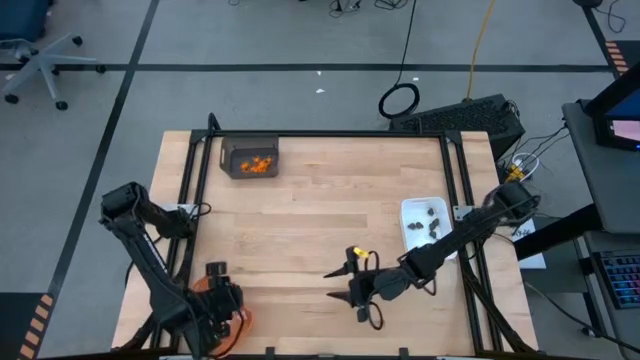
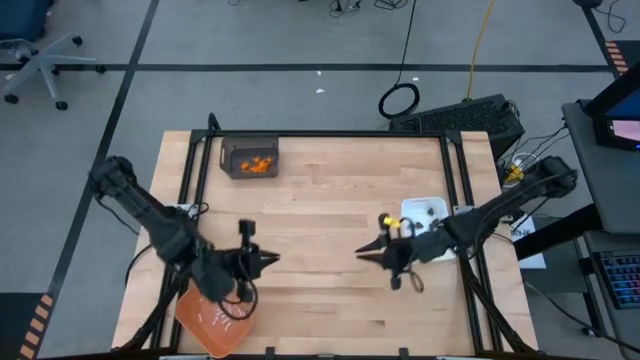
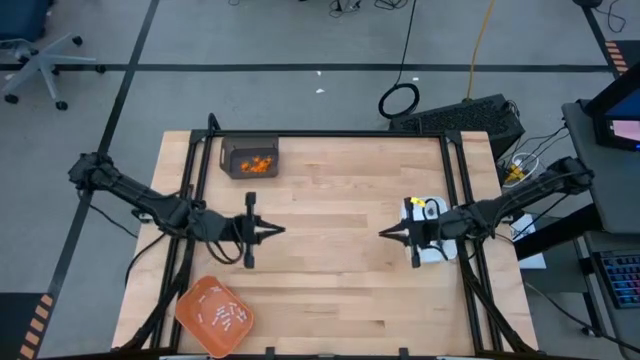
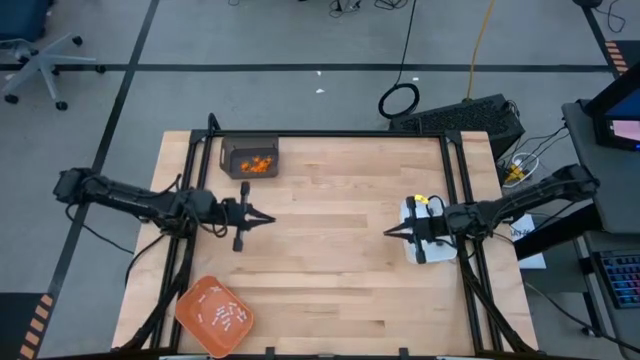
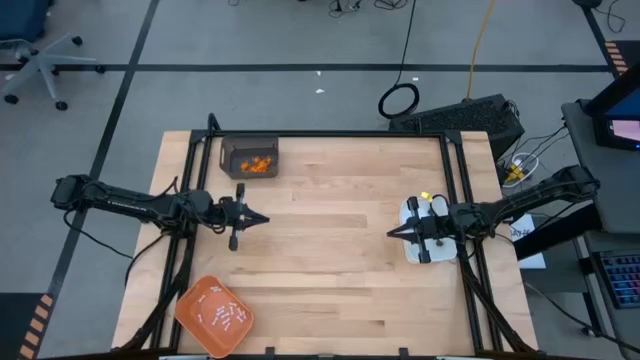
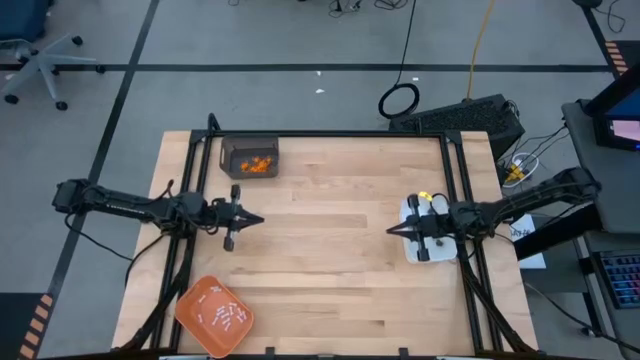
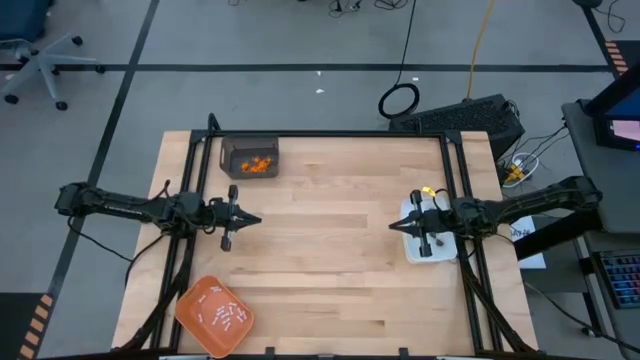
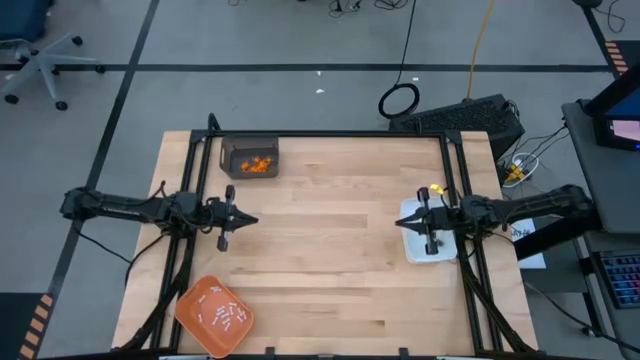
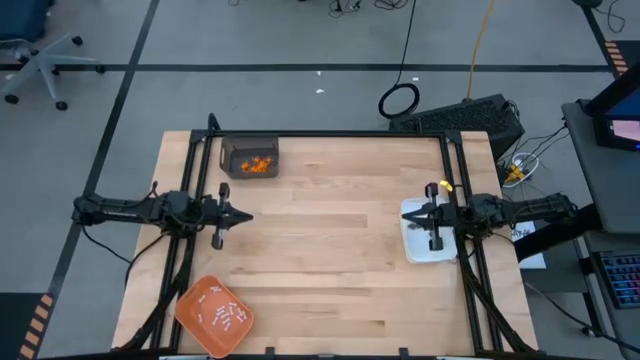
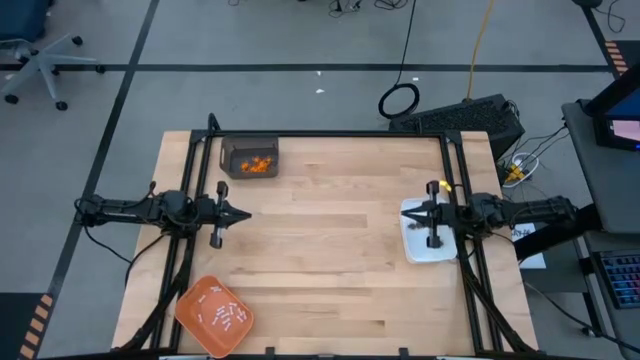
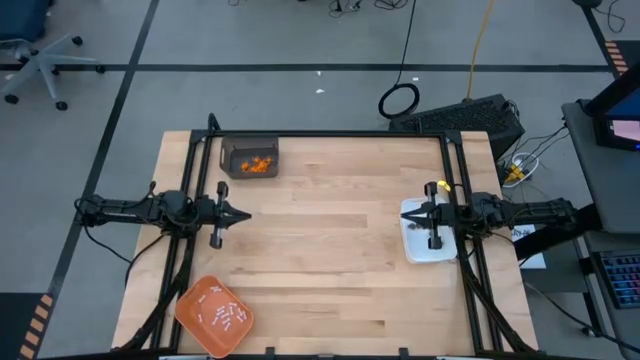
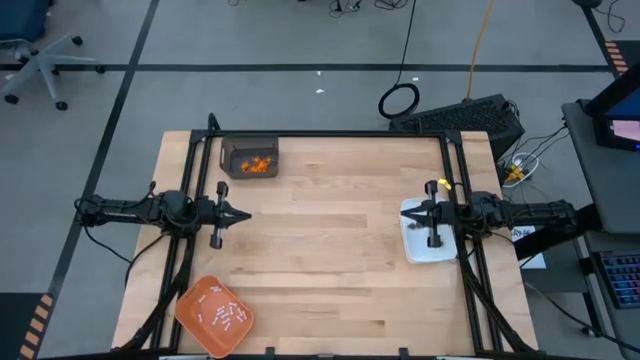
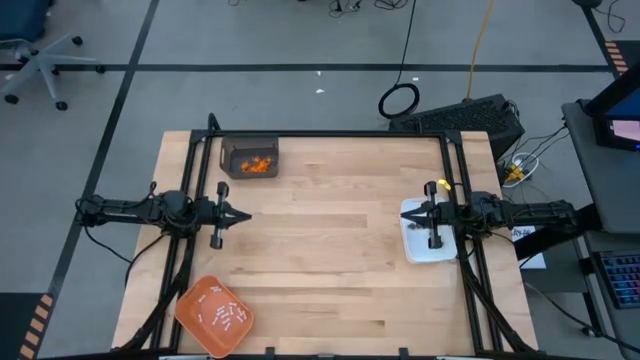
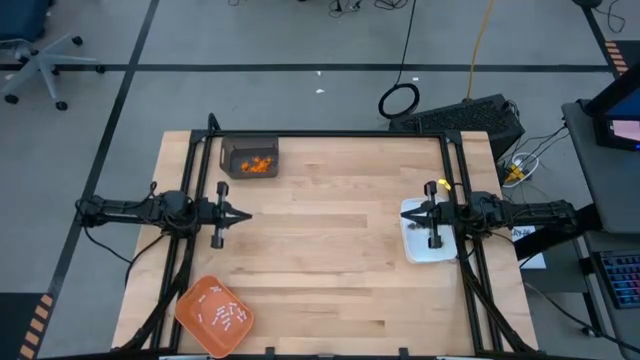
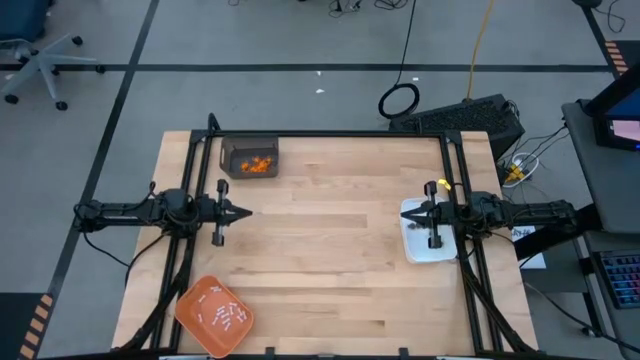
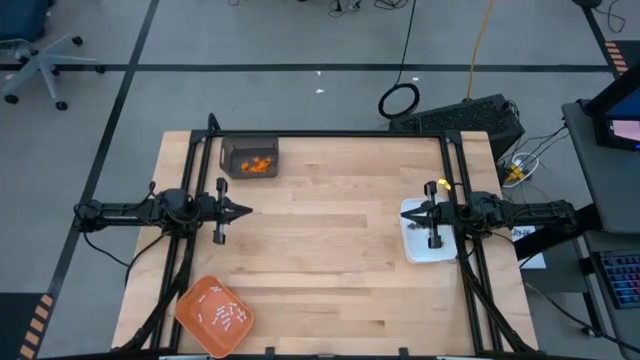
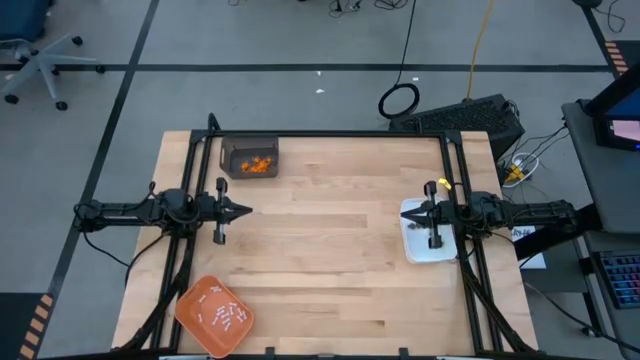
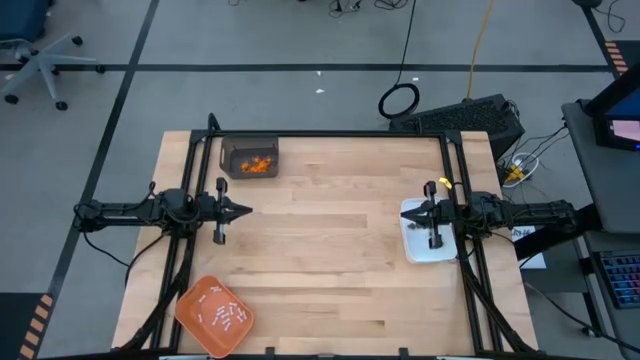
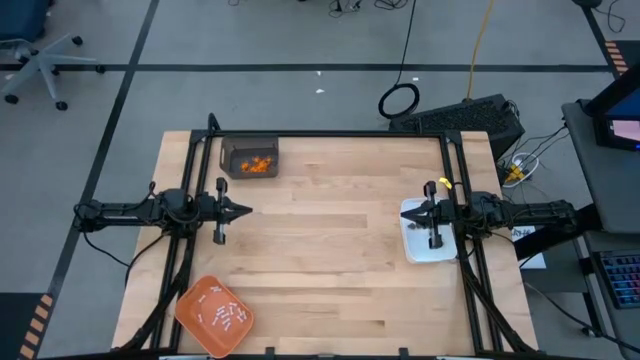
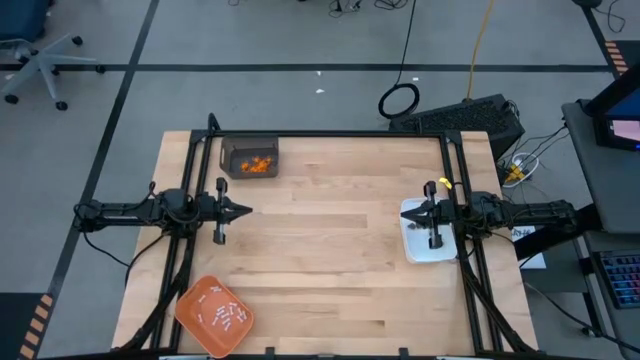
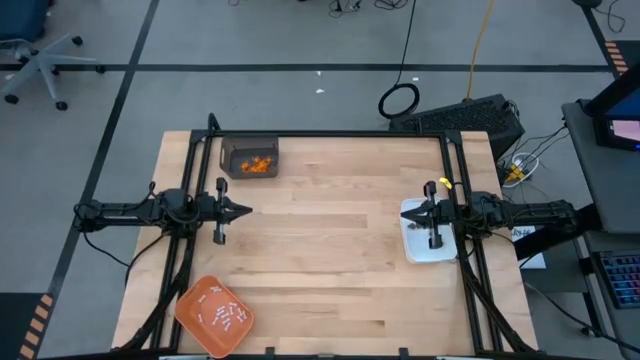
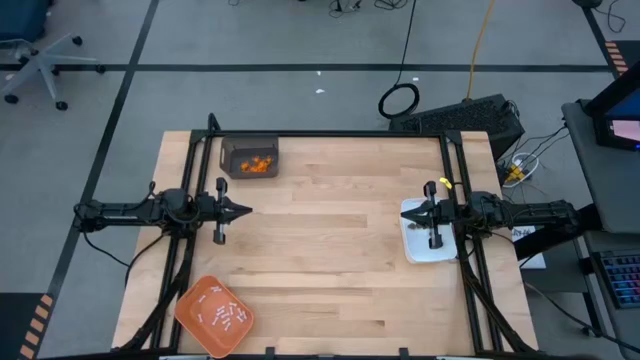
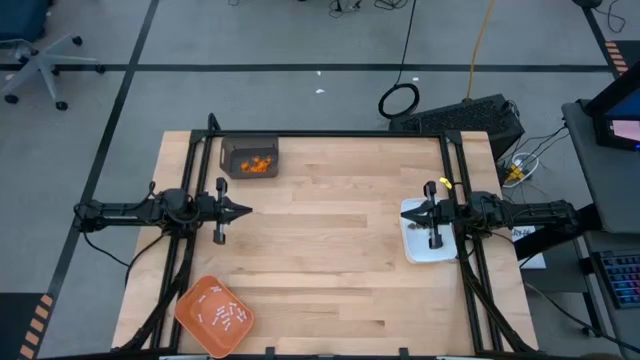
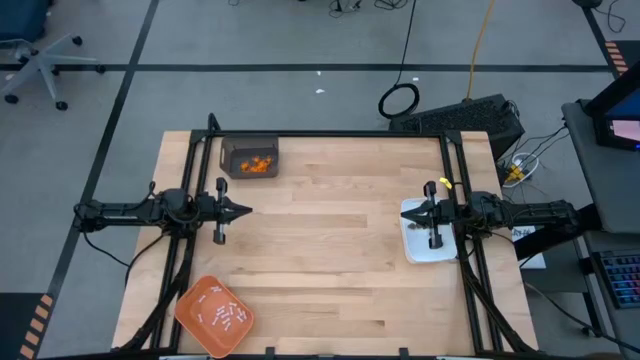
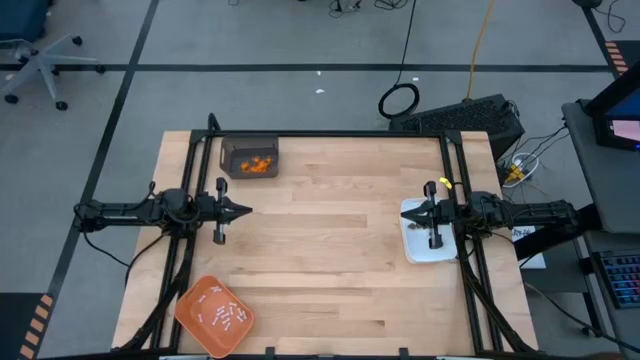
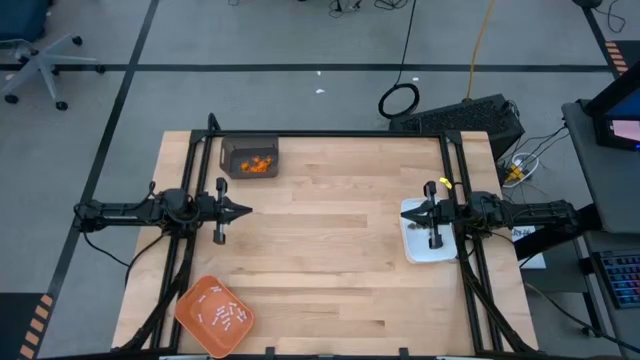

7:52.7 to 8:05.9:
Task: Sort Halloween decoration
Return to Home Position

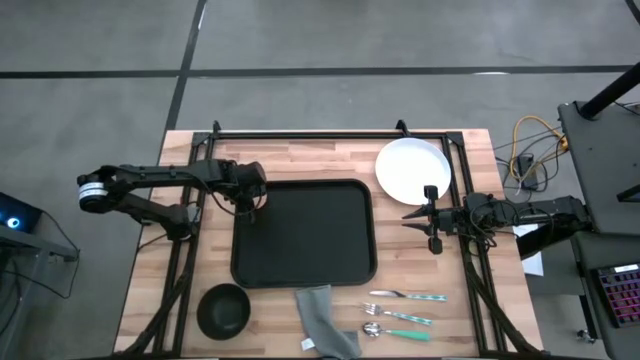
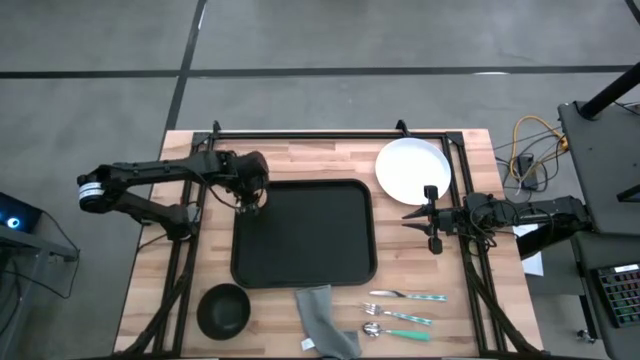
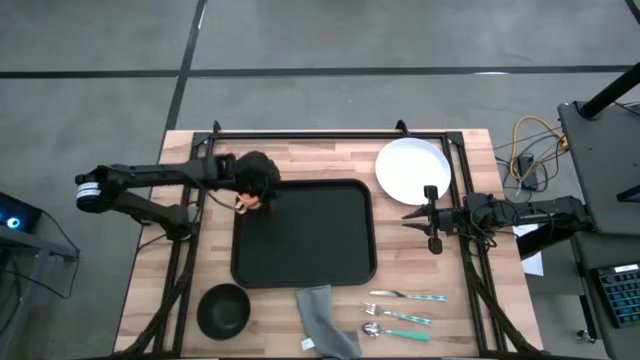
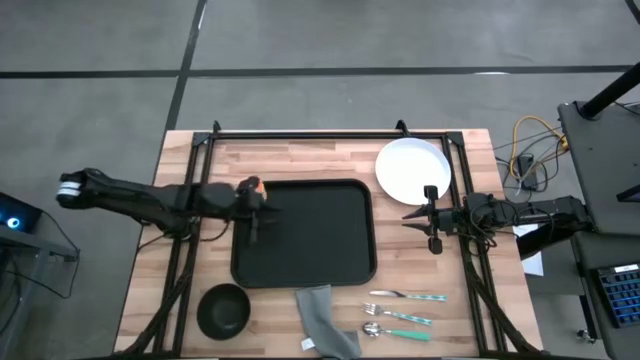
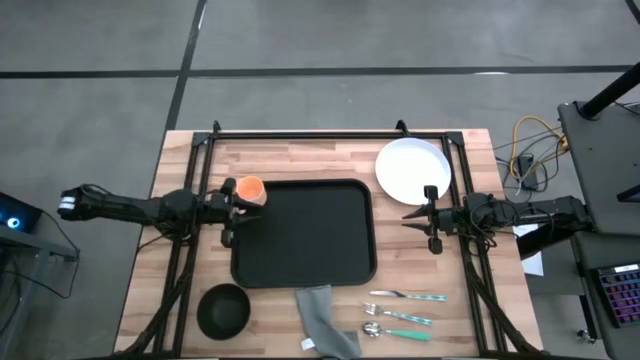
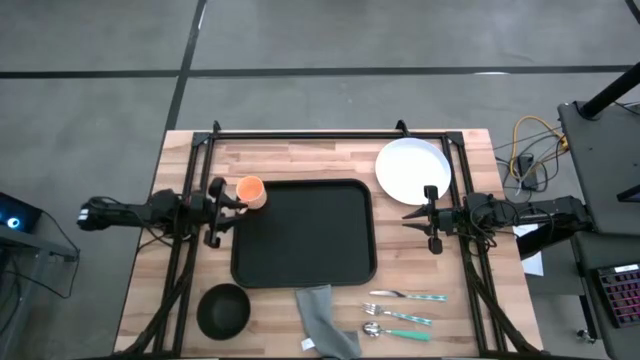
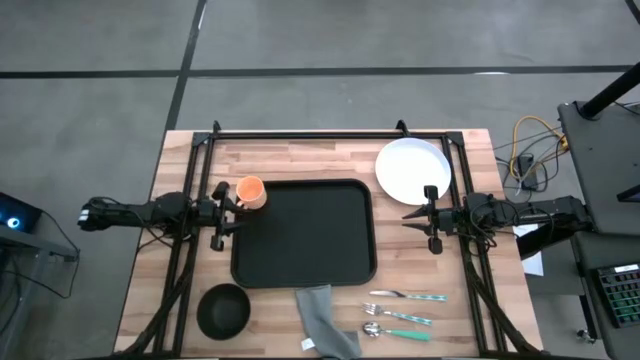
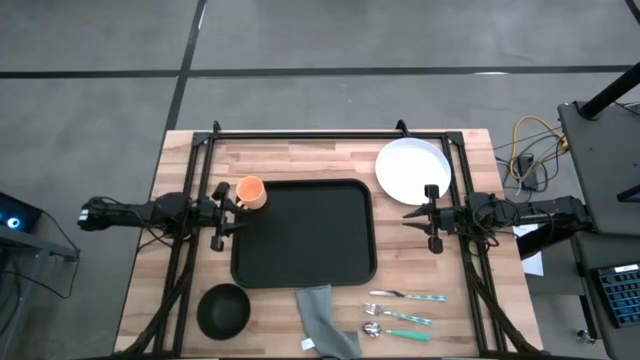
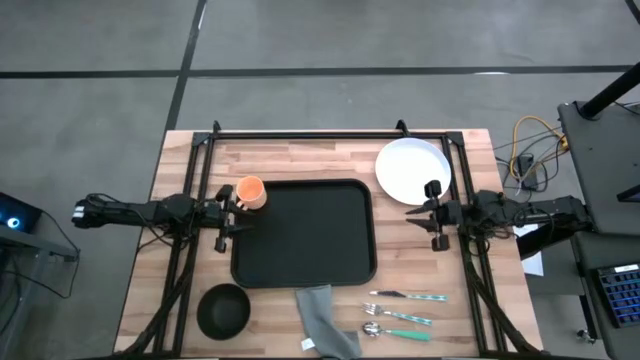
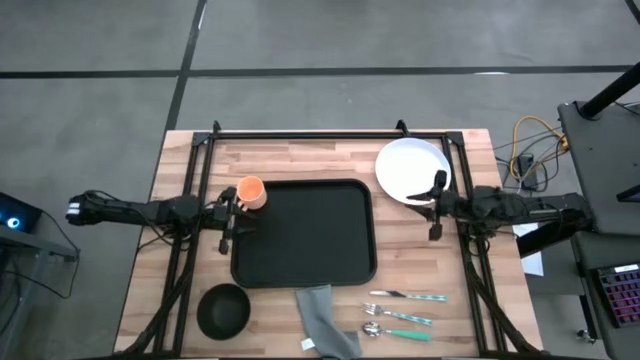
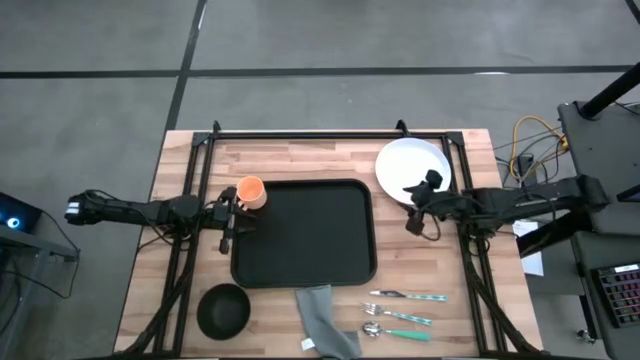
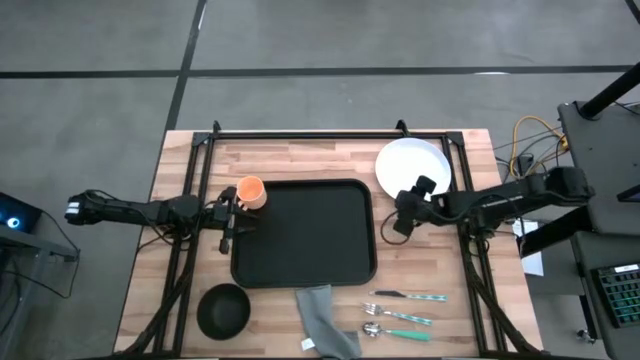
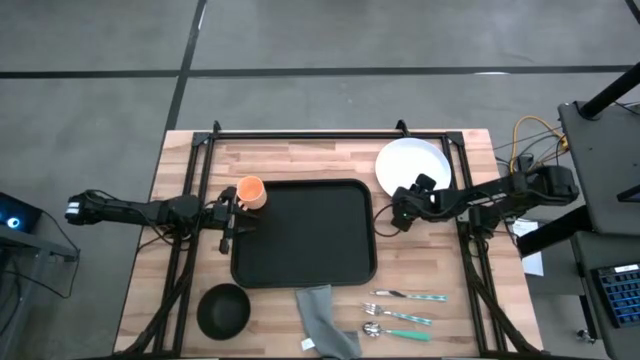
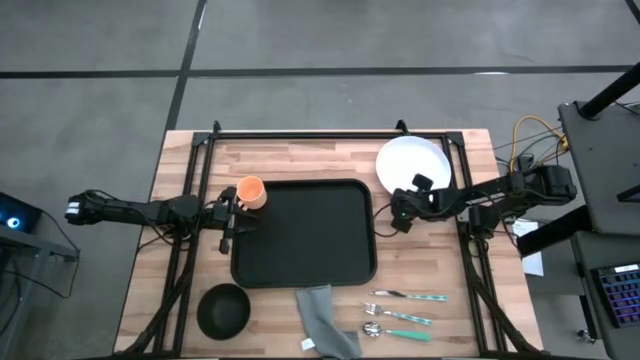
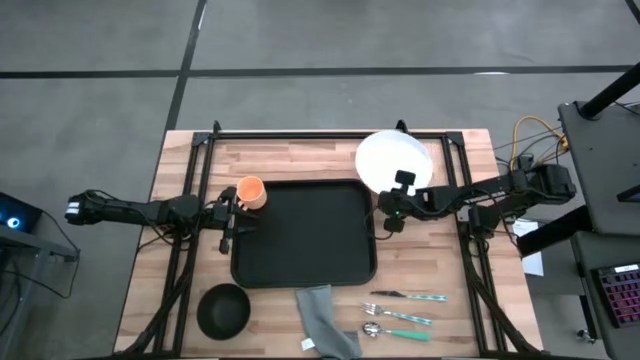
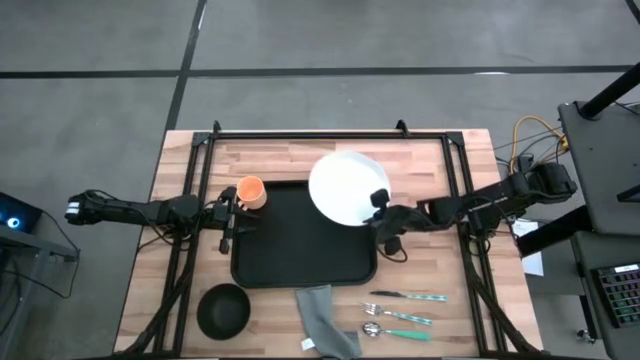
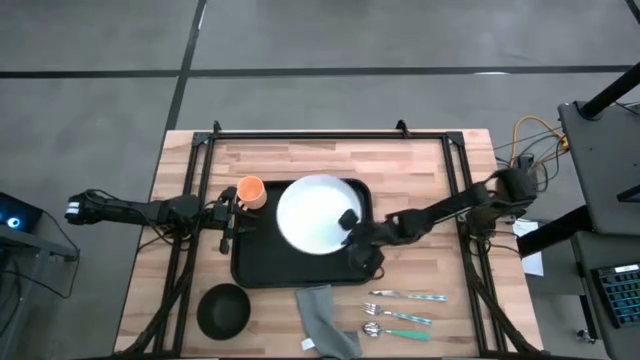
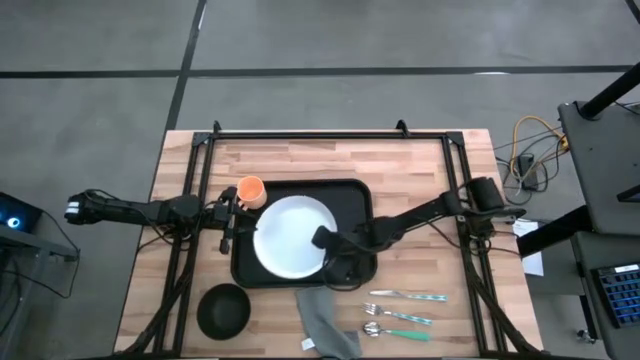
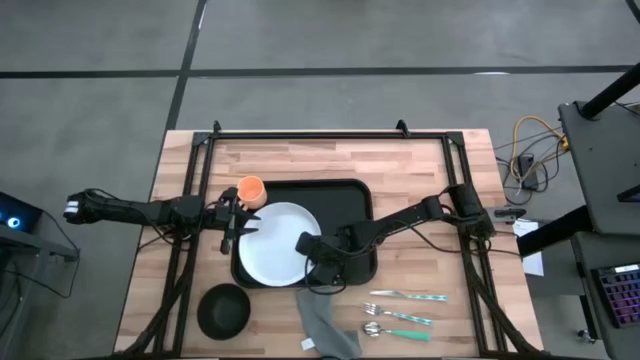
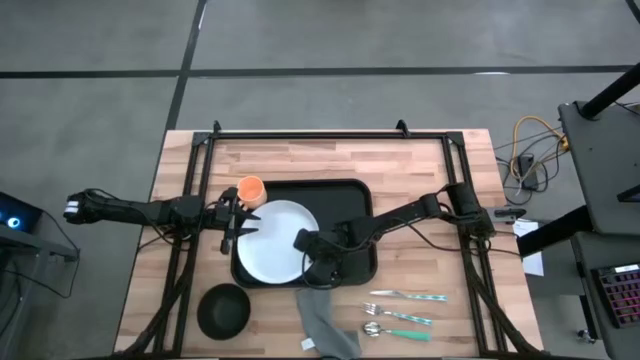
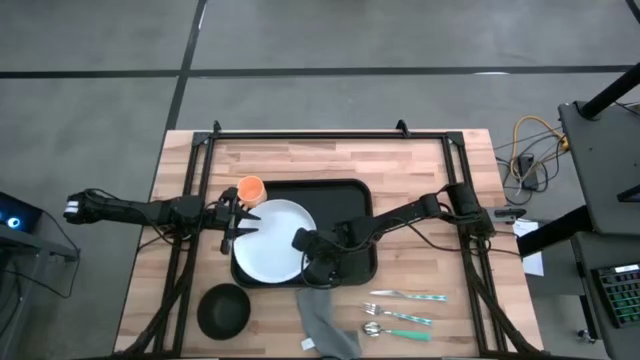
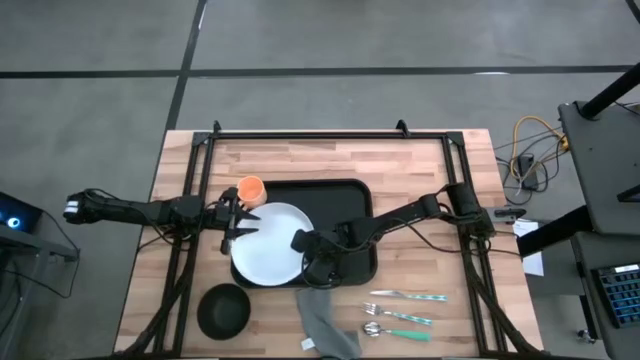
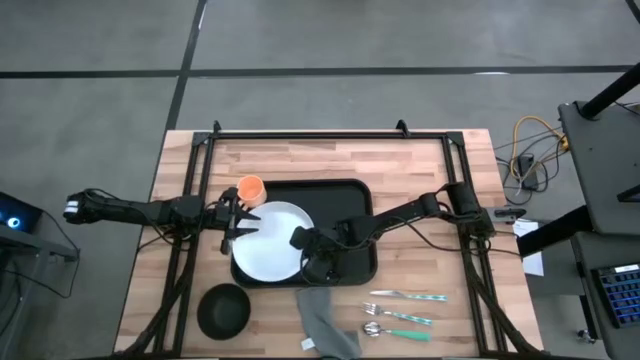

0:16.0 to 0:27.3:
Task: Set up tray
Put the white plate on the black tray to the bottom right of the yellow cup
